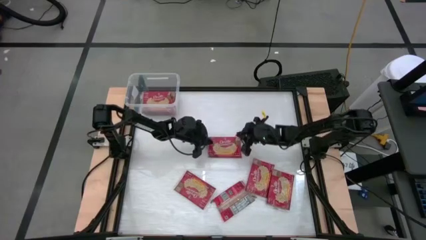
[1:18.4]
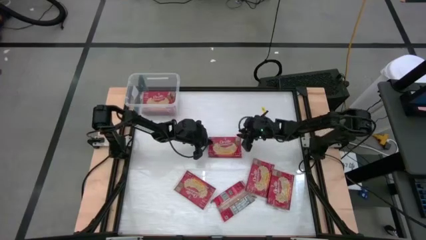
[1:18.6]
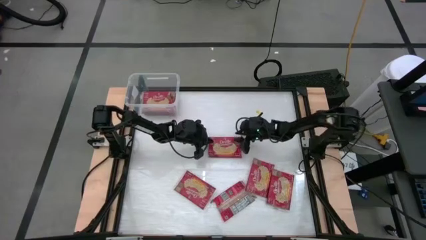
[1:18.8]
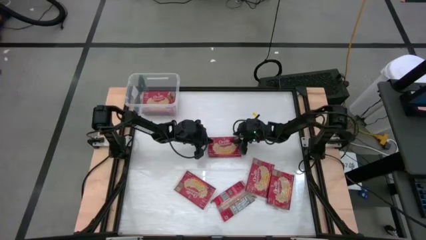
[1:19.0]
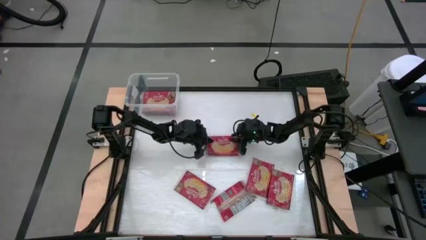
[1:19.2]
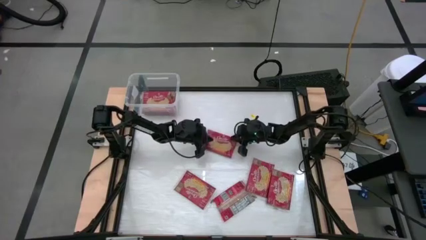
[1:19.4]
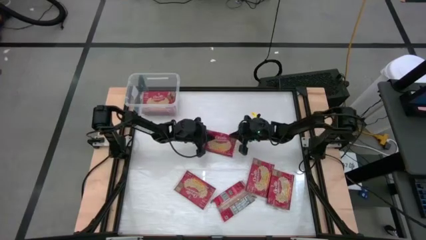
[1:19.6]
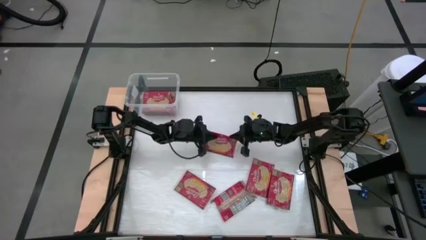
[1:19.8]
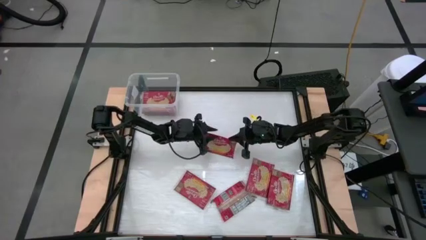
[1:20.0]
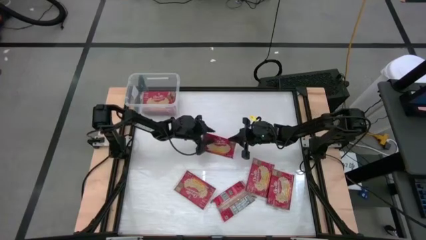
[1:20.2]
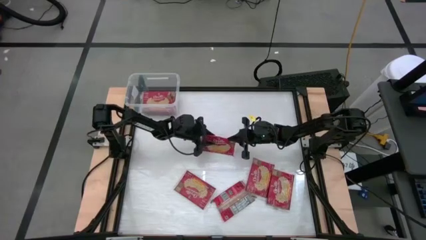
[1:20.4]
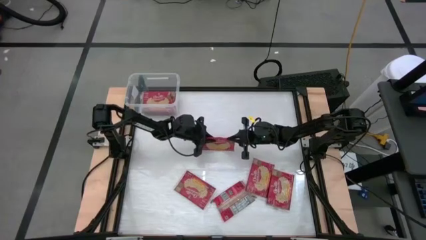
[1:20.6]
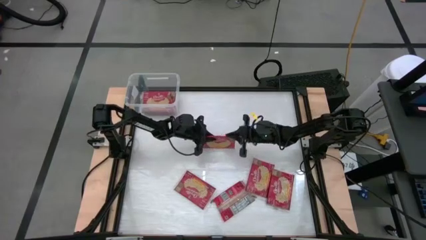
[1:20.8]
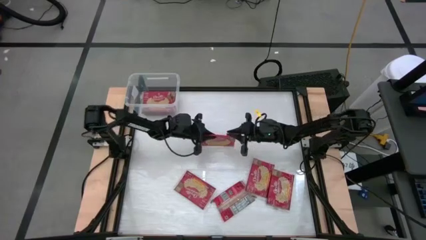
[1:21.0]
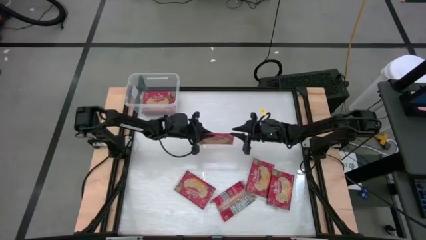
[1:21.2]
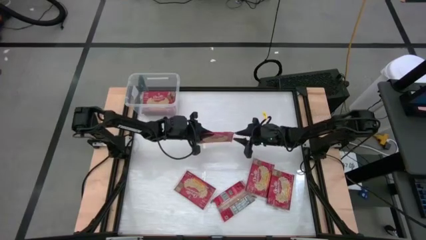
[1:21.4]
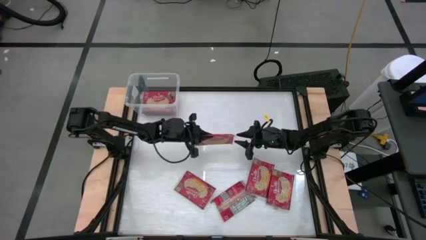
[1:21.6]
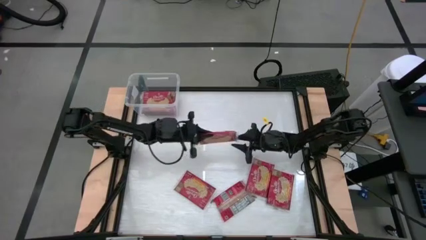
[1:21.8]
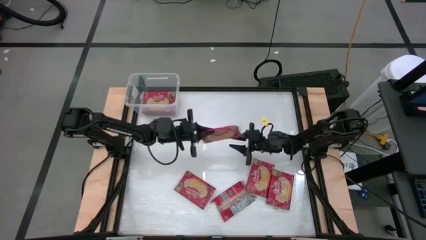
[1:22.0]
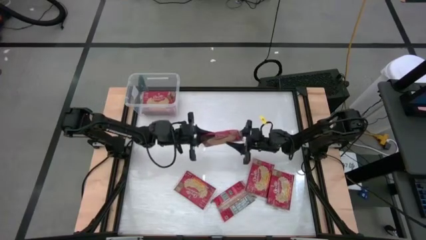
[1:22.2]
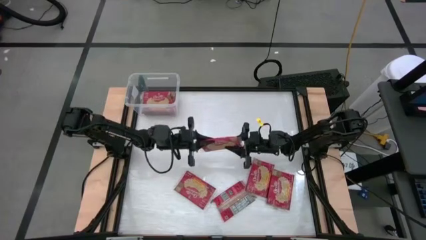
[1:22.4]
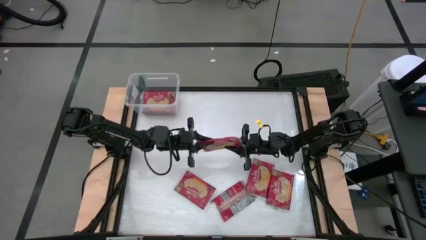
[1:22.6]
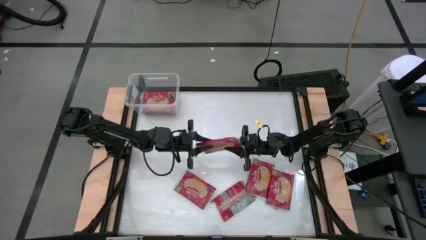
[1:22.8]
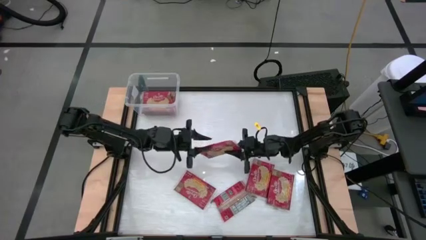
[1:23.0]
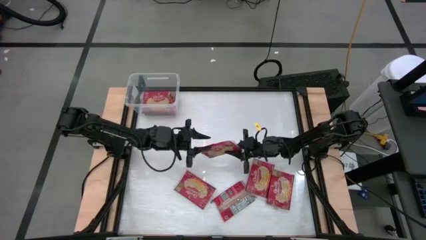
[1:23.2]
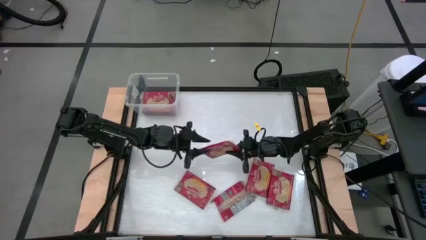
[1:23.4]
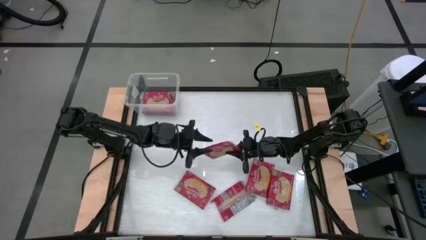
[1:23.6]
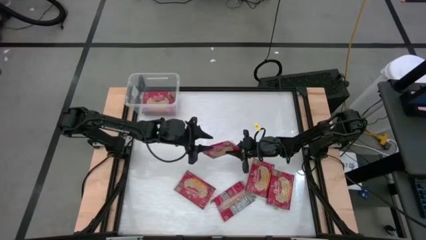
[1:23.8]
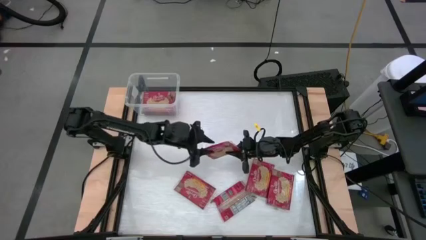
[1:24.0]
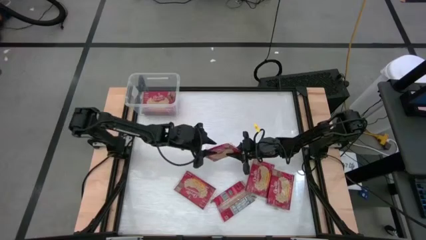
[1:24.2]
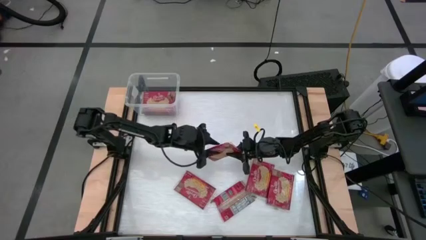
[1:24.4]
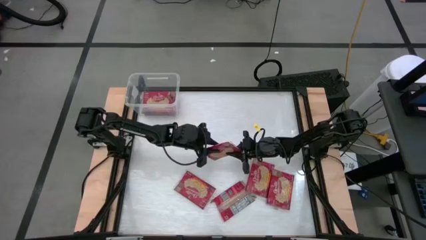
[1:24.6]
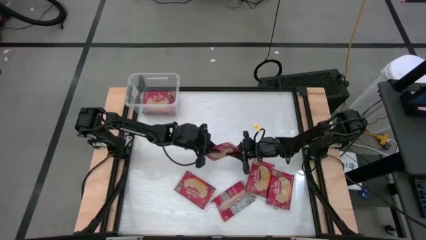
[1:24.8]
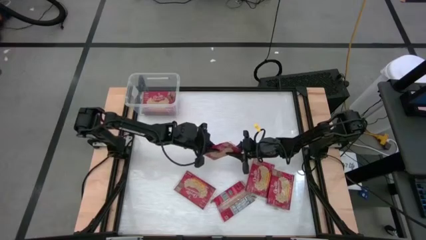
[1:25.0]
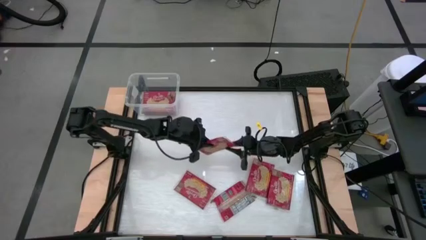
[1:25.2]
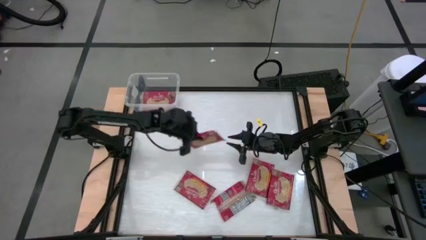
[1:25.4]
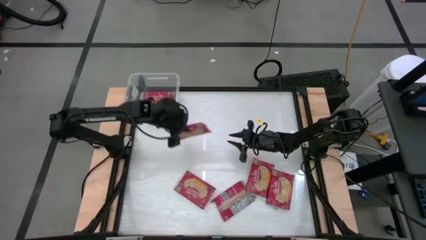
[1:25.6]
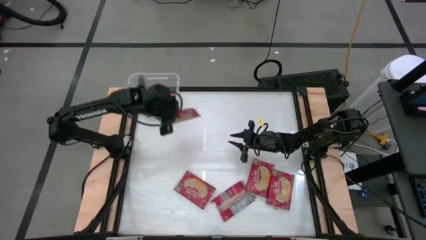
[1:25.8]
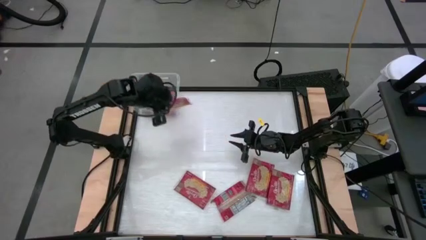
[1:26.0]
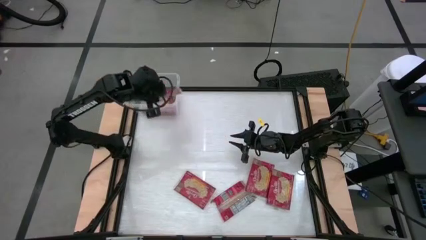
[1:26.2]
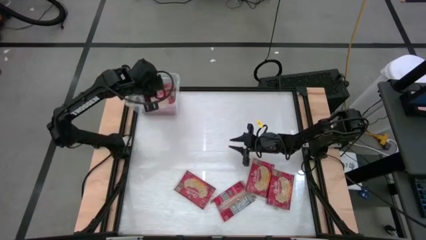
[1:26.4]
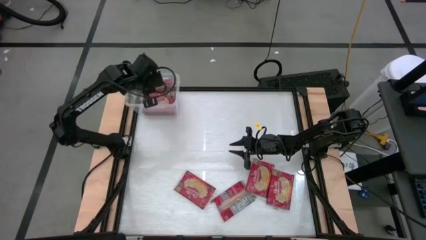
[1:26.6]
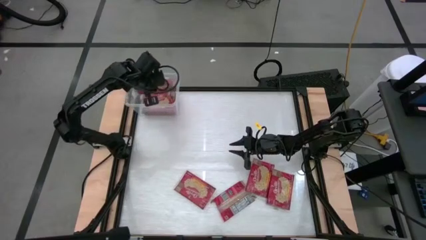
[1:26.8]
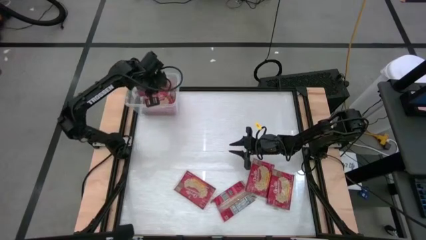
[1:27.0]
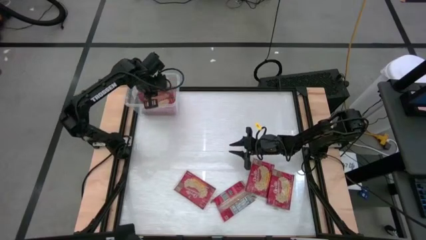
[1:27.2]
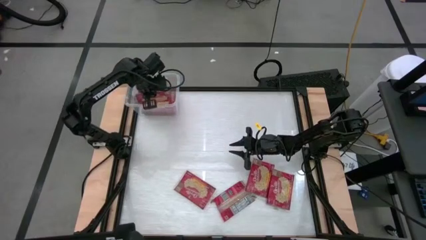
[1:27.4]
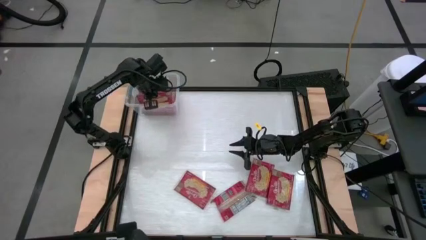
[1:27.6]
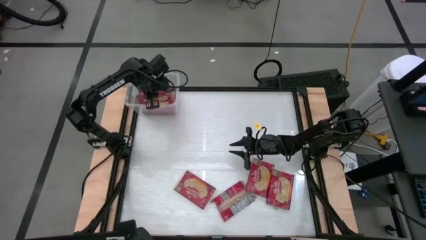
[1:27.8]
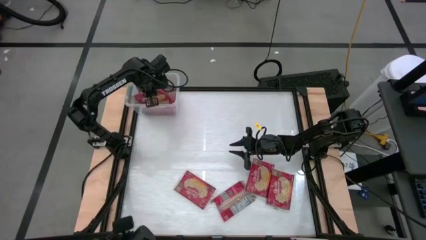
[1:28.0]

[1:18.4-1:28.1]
Task: Sort popcorn bags into baskets
Put the red popcorn bag into the transparent container

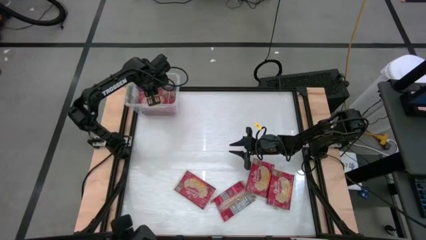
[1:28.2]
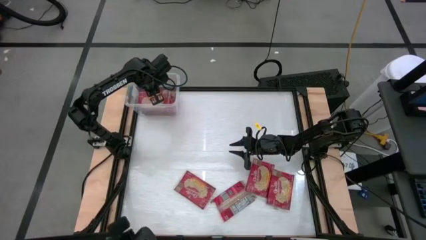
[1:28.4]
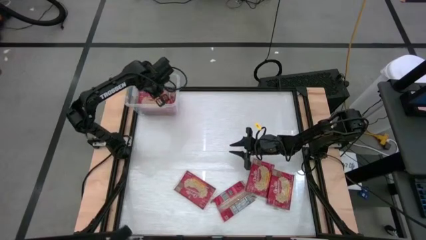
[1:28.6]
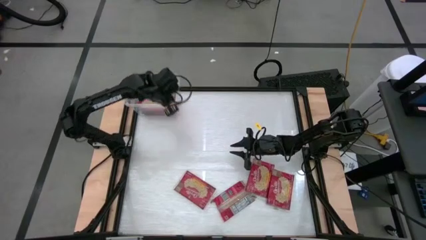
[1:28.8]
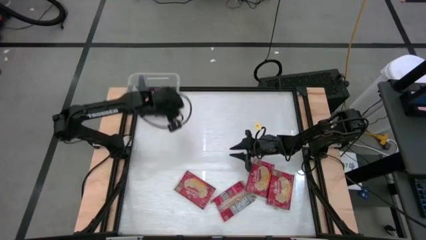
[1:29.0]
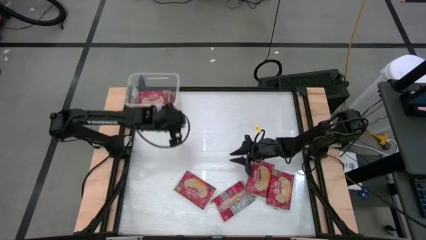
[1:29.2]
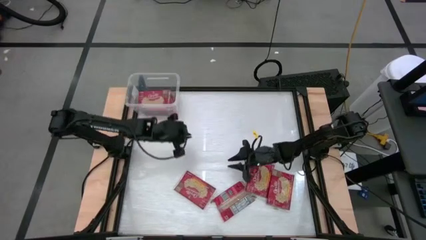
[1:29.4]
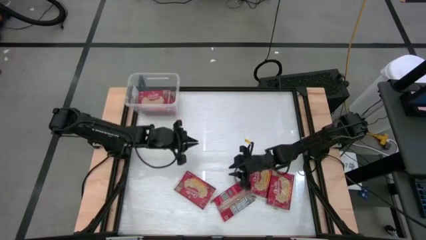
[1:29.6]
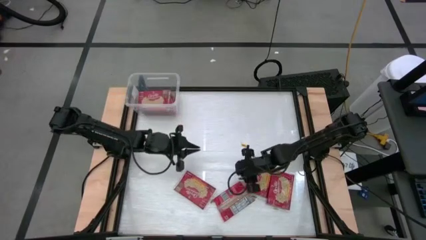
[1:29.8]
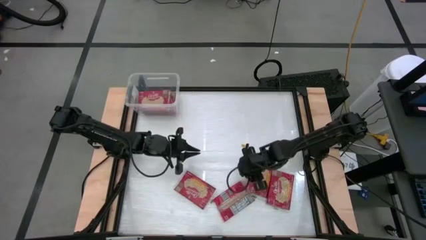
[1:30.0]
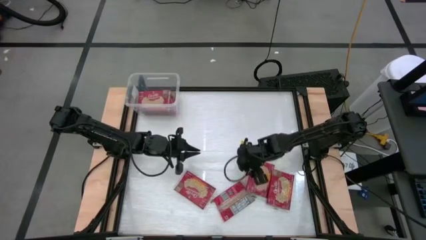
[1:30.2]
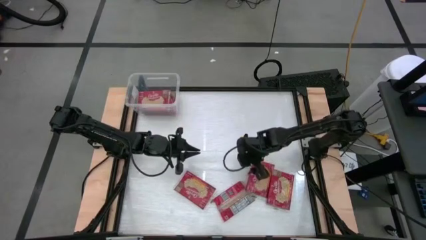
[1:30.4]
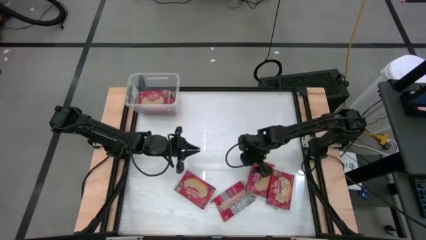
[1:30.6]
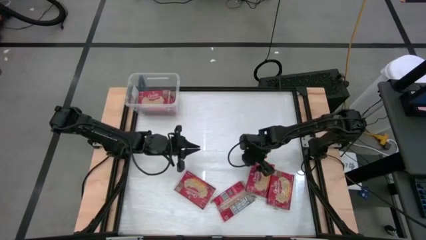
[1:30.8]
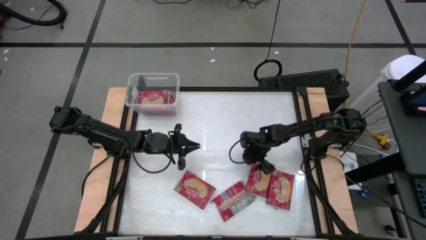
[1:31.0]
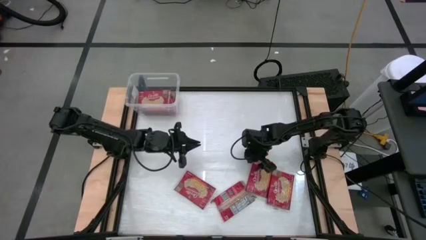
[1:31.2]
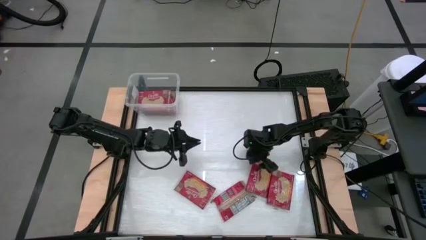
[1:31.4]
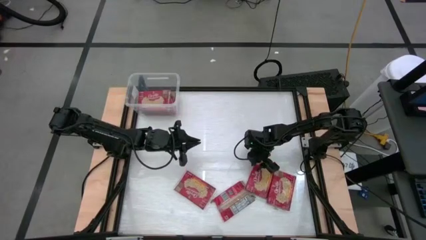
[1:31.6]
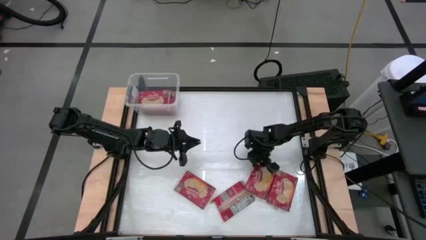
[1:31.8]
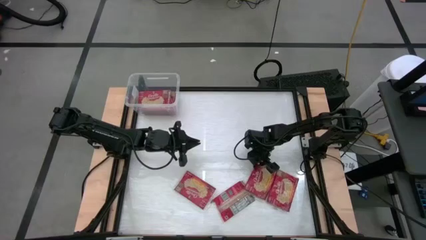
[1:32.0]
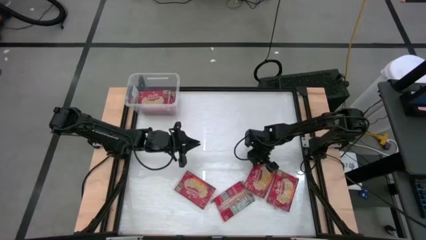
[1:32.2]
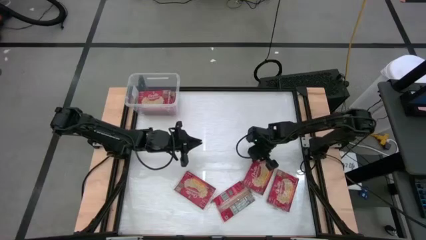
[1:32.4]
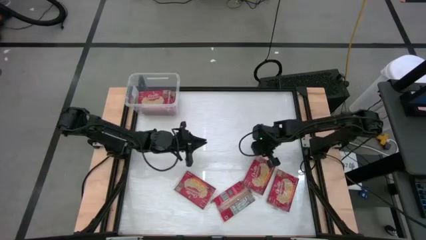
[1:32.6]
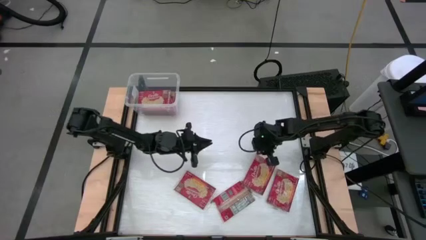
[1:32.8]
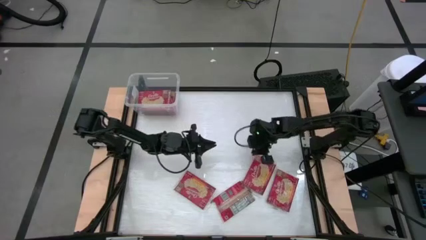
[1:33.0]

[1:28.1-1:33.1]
Put the red popcorn bag into the transparent container

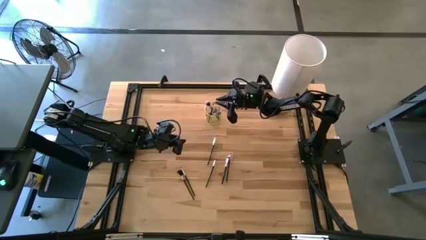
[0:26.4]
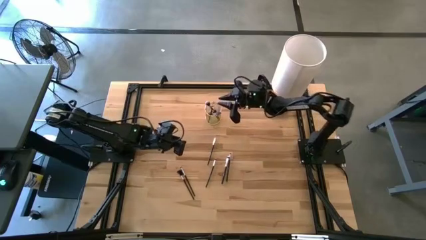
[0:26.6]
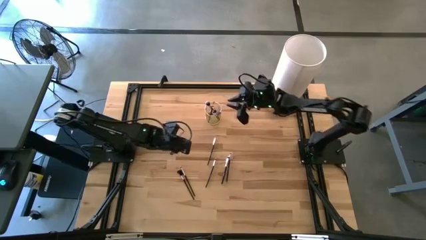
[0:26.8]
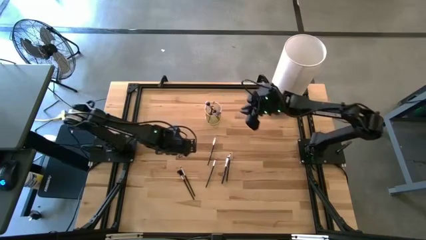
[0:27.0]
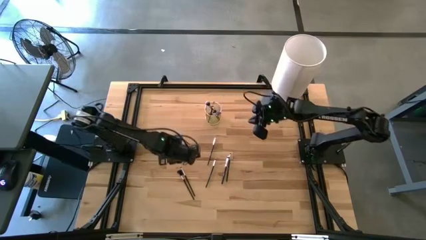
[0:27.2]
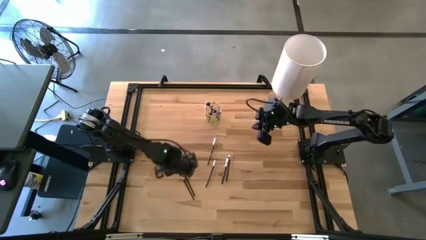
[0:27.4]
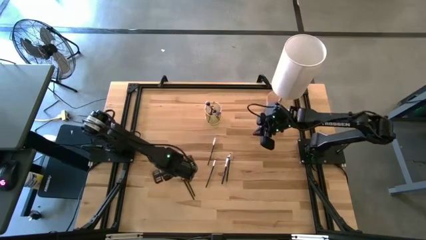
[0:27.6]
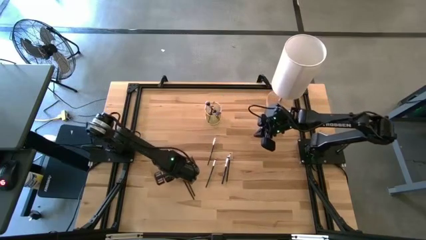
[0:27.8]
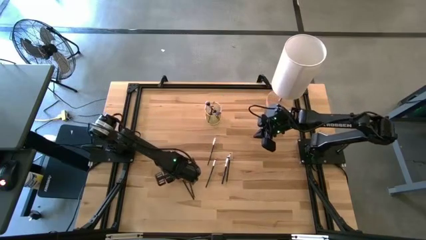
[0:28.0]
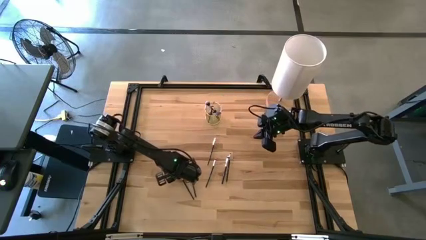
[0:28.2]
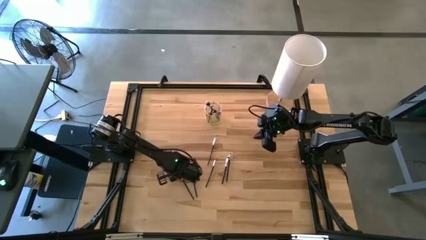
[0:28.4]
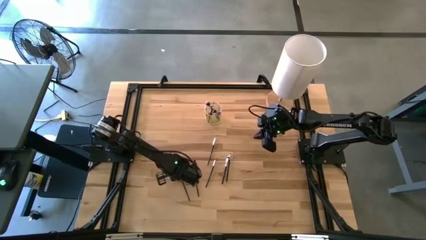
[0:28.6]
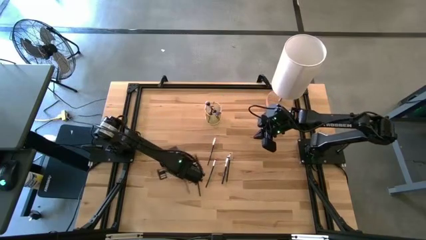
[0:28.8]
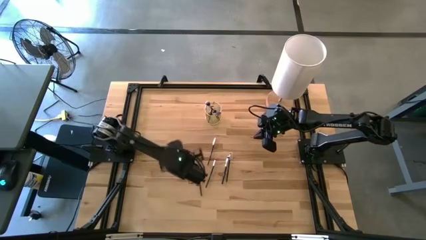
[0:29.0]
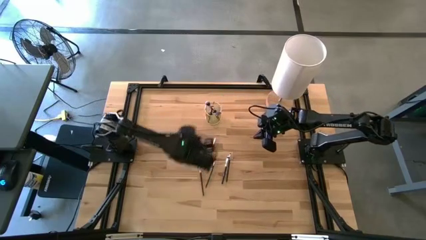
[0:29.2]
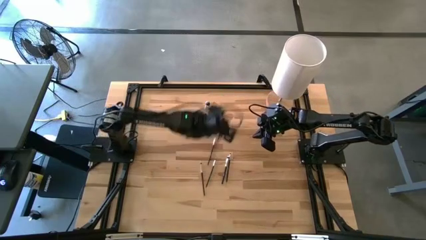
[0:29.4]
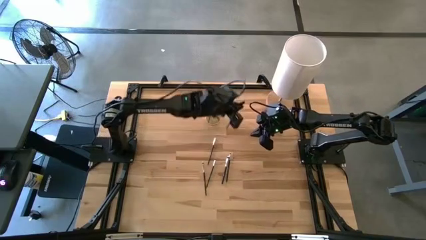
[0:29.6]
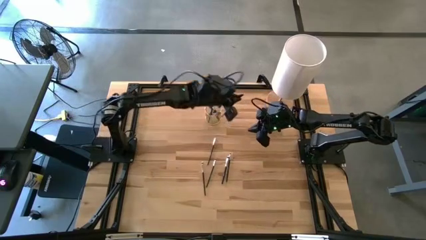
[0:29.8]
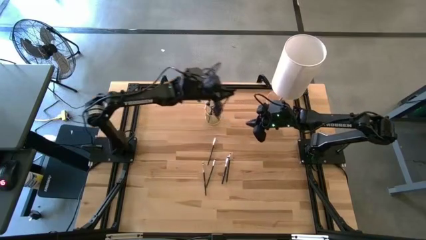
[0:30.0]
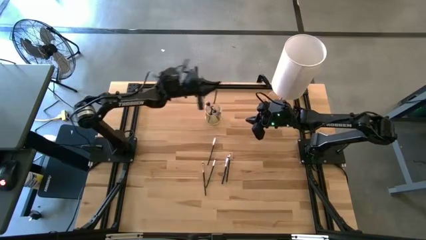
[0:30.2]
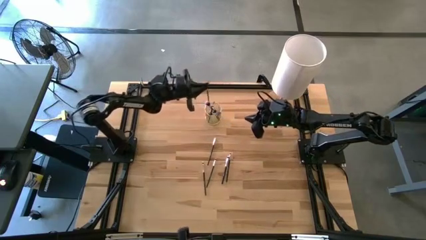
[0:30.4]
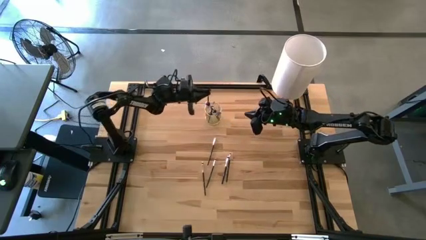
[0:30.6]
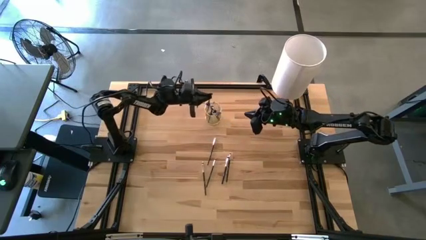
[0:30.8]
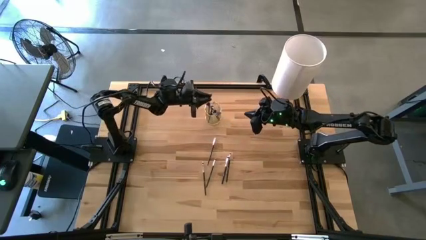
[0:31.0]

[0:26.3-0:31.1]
Task: Put items in baskets/containers
Put the brow brush into the pen holder
